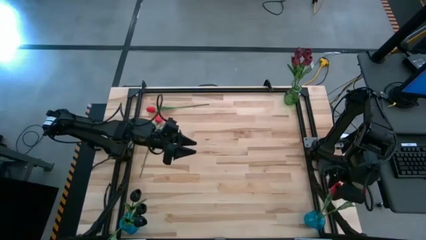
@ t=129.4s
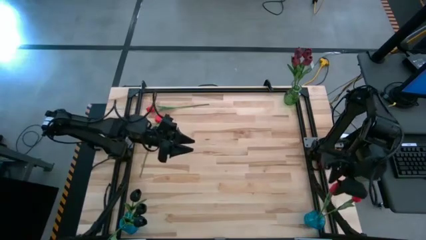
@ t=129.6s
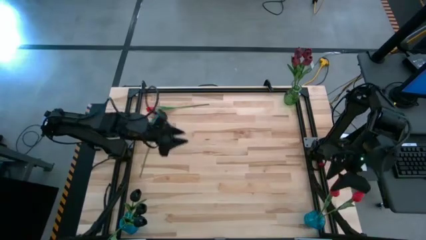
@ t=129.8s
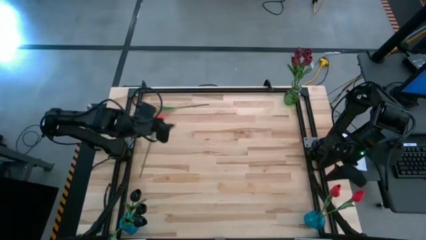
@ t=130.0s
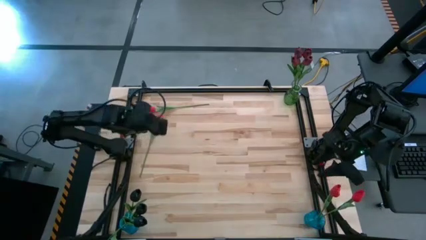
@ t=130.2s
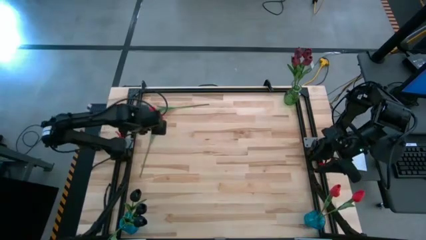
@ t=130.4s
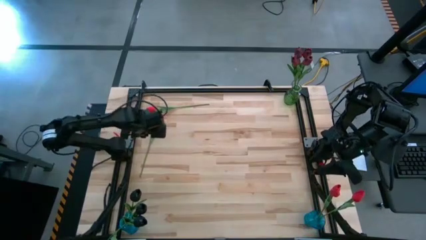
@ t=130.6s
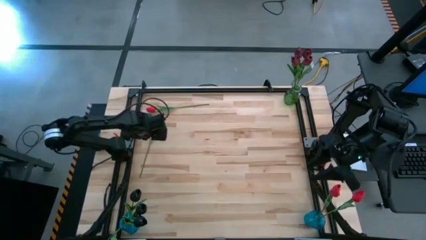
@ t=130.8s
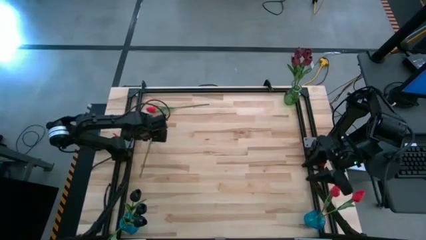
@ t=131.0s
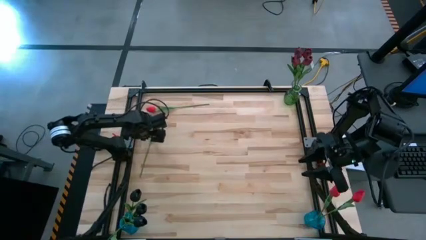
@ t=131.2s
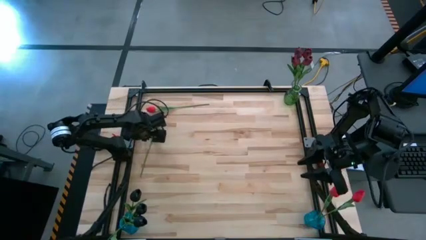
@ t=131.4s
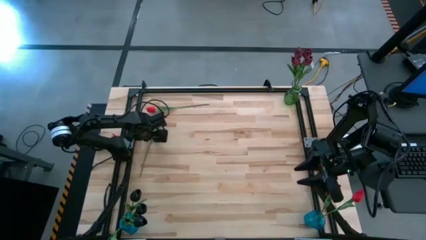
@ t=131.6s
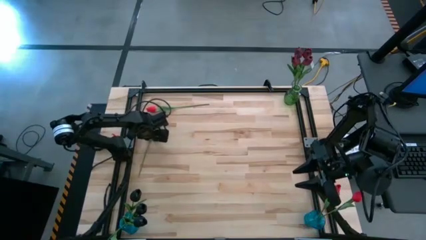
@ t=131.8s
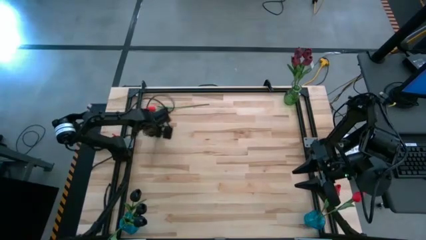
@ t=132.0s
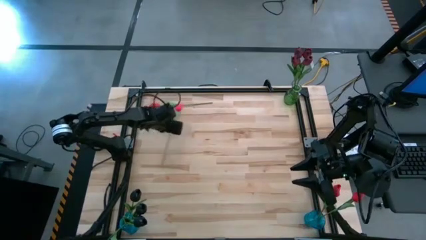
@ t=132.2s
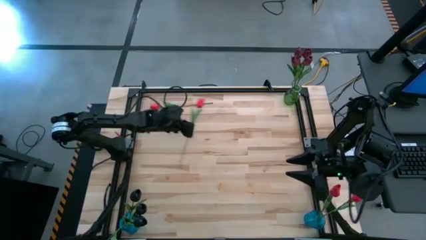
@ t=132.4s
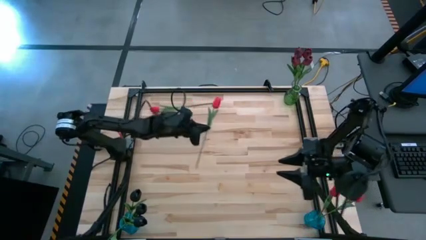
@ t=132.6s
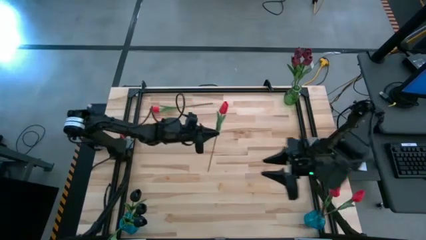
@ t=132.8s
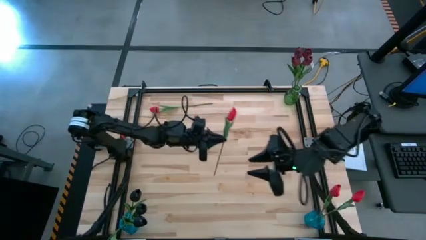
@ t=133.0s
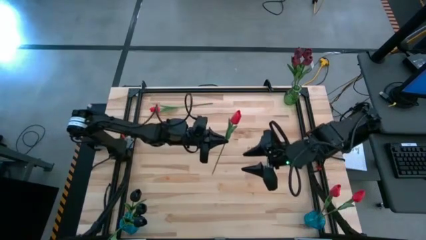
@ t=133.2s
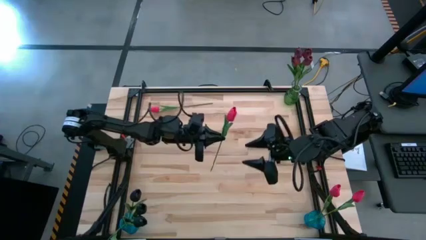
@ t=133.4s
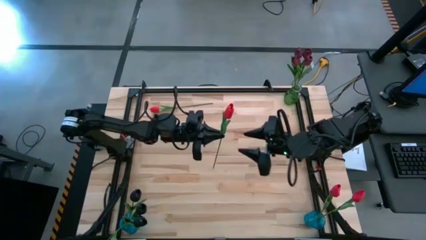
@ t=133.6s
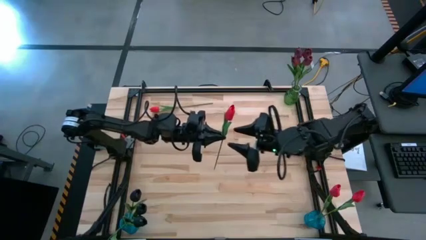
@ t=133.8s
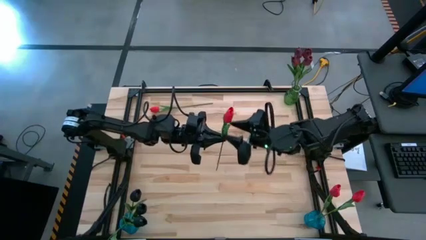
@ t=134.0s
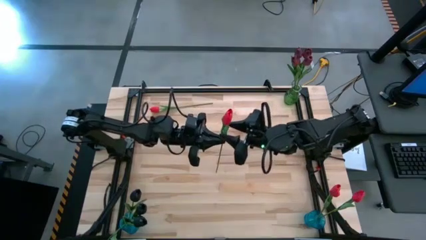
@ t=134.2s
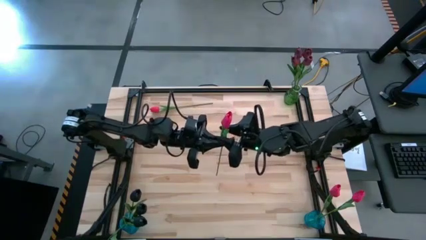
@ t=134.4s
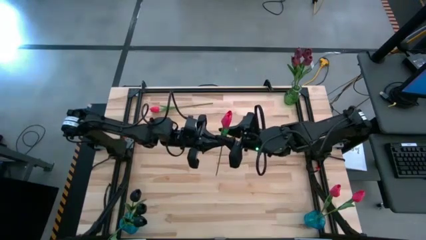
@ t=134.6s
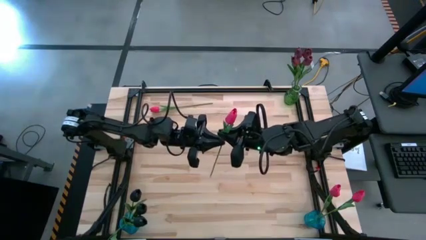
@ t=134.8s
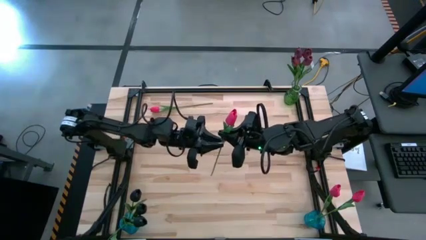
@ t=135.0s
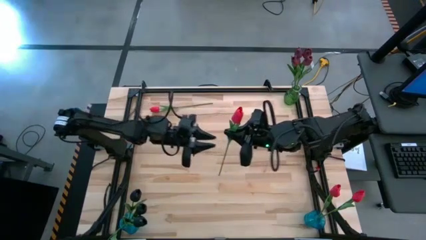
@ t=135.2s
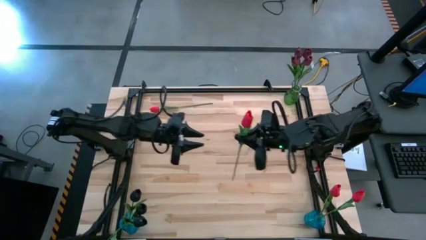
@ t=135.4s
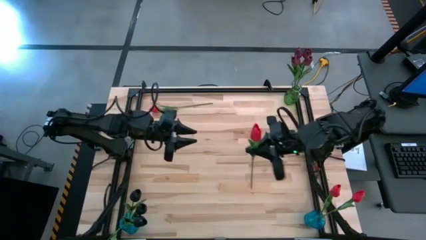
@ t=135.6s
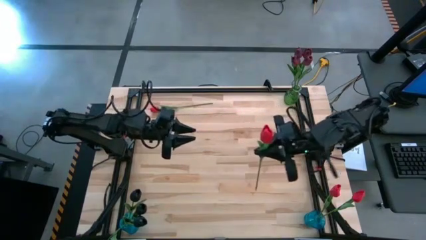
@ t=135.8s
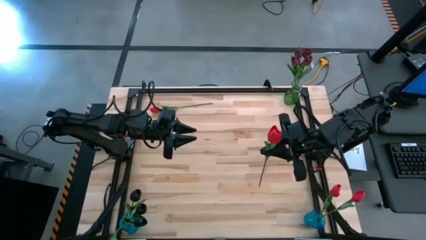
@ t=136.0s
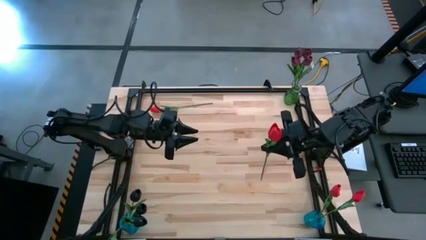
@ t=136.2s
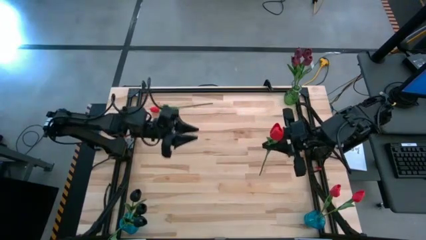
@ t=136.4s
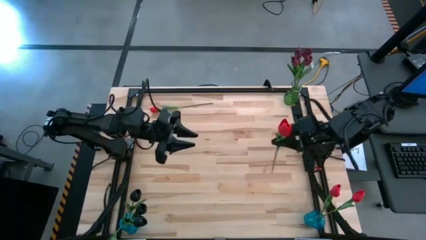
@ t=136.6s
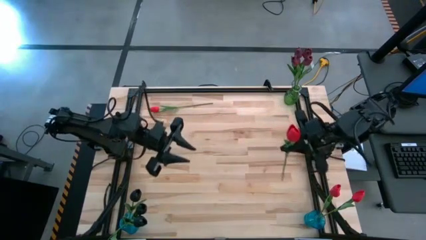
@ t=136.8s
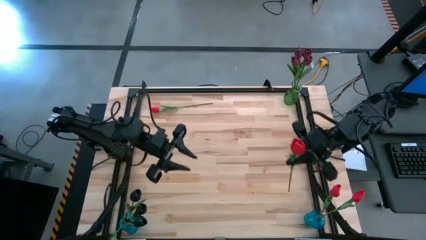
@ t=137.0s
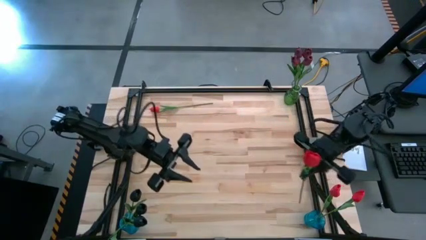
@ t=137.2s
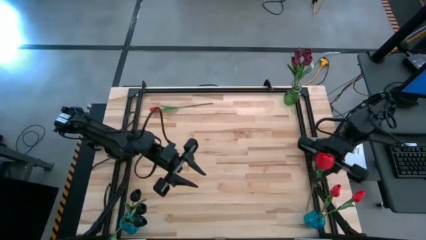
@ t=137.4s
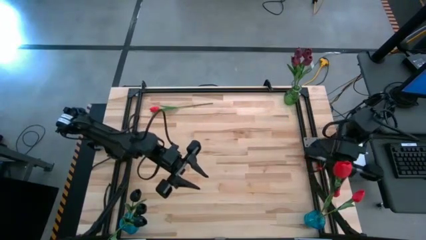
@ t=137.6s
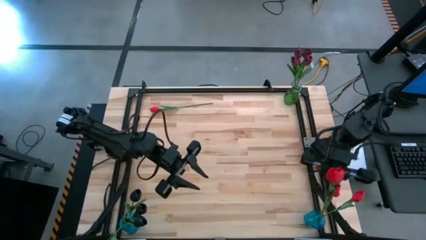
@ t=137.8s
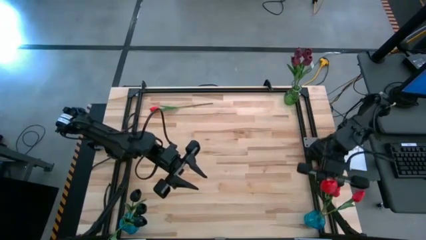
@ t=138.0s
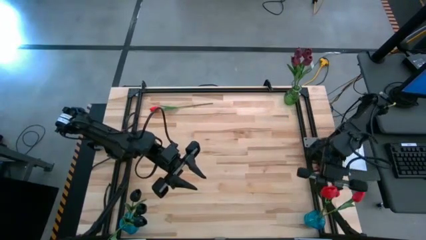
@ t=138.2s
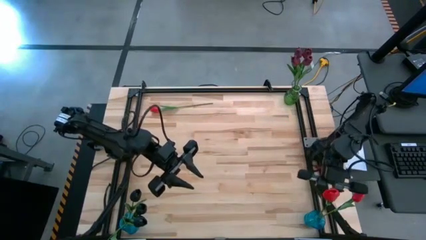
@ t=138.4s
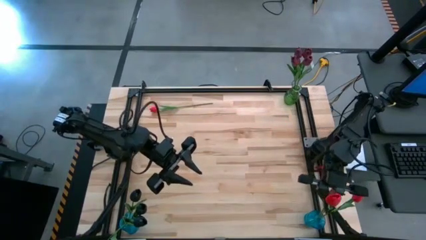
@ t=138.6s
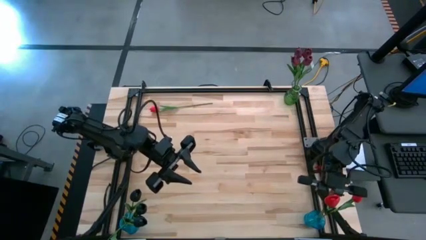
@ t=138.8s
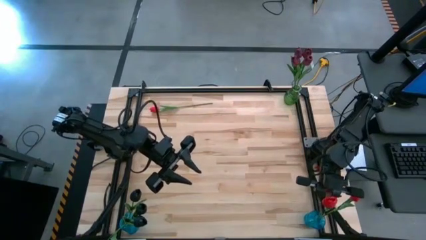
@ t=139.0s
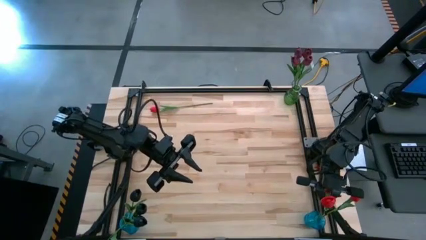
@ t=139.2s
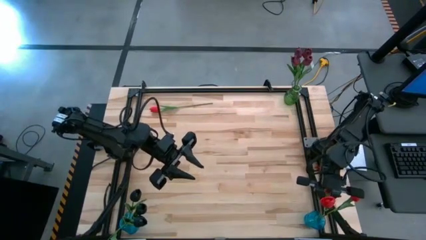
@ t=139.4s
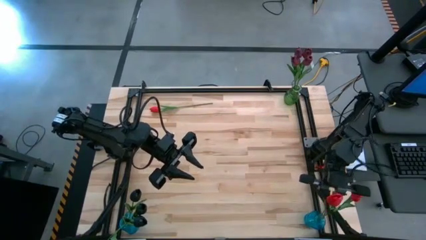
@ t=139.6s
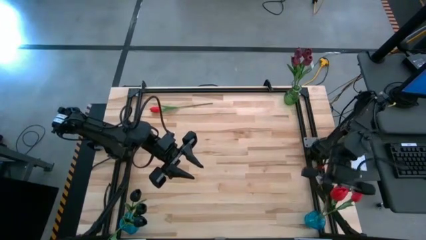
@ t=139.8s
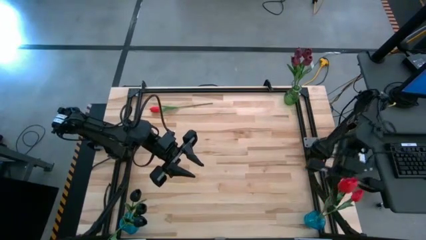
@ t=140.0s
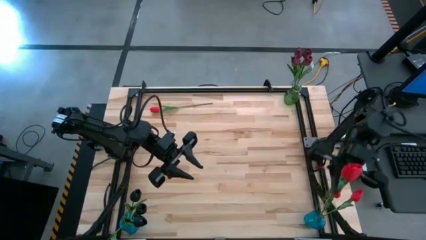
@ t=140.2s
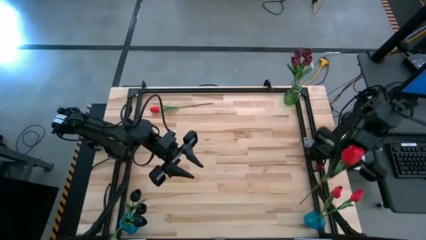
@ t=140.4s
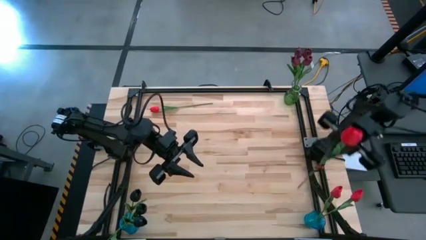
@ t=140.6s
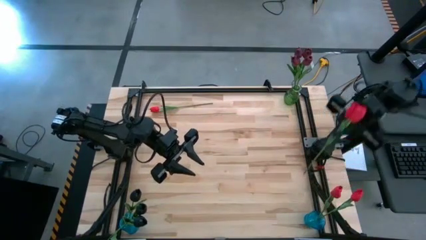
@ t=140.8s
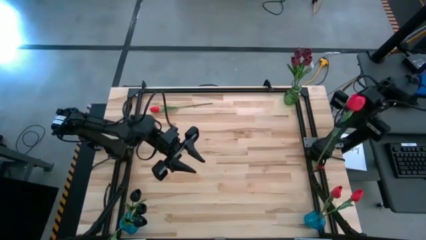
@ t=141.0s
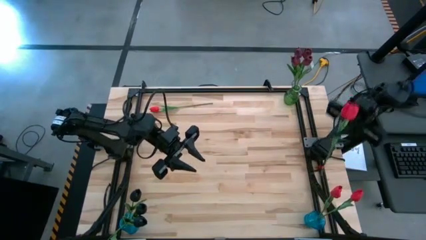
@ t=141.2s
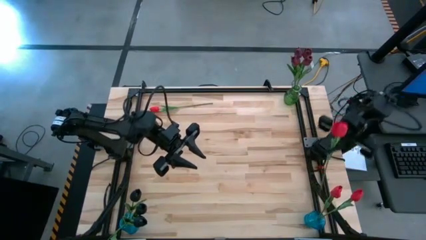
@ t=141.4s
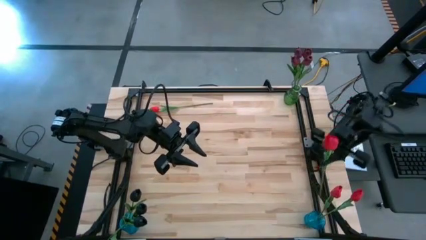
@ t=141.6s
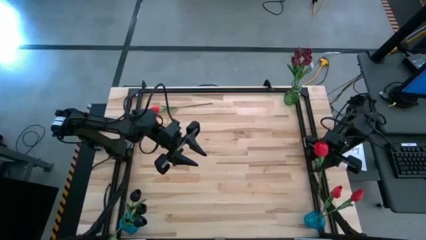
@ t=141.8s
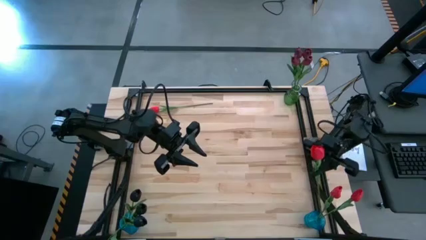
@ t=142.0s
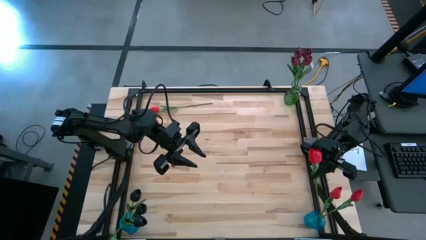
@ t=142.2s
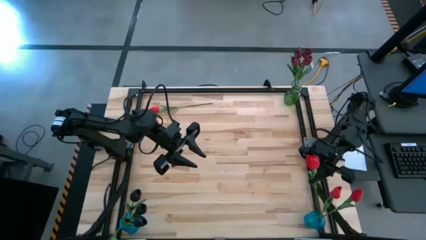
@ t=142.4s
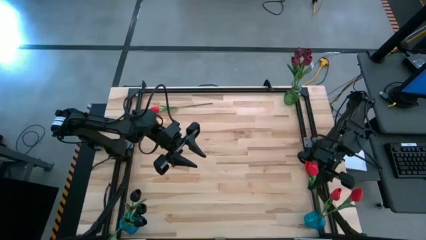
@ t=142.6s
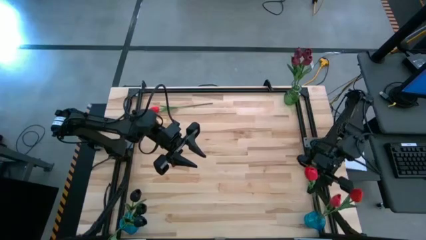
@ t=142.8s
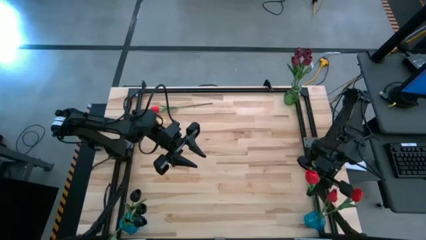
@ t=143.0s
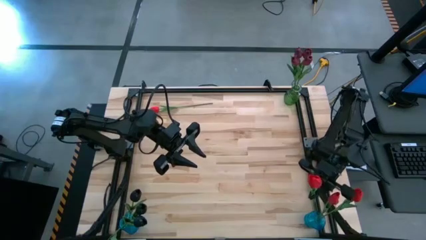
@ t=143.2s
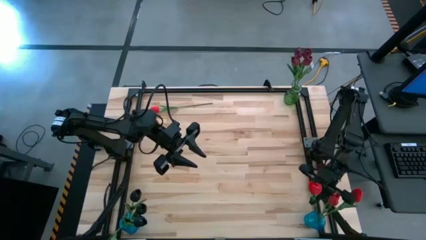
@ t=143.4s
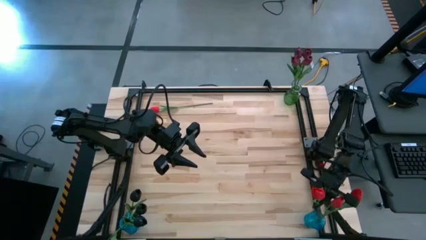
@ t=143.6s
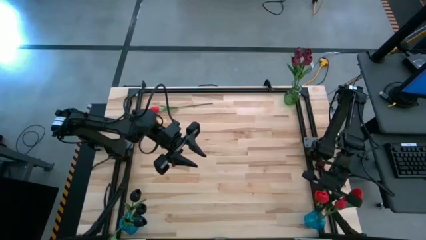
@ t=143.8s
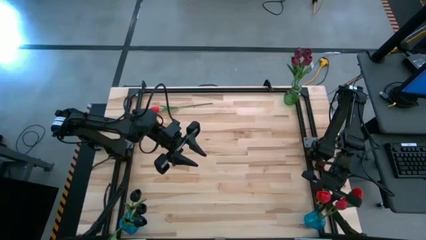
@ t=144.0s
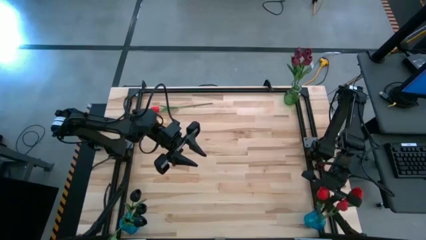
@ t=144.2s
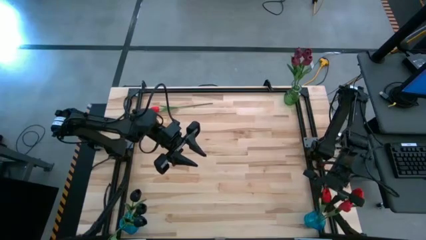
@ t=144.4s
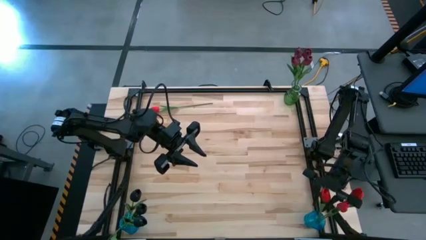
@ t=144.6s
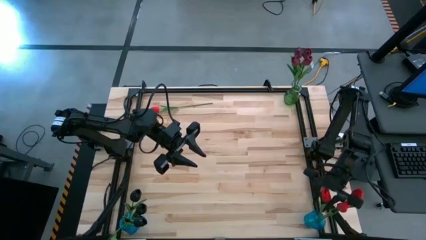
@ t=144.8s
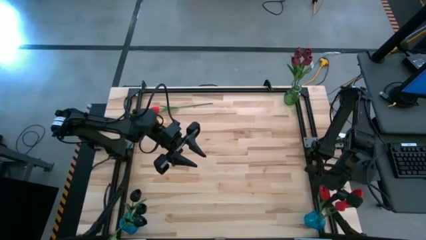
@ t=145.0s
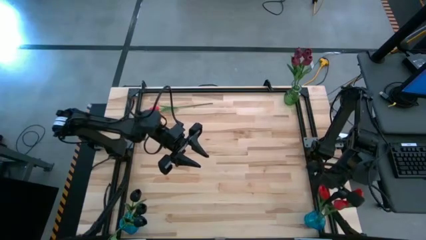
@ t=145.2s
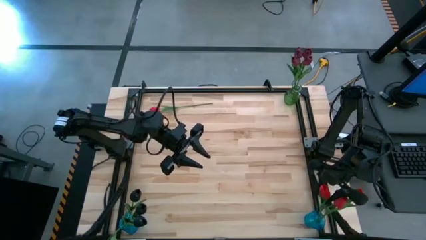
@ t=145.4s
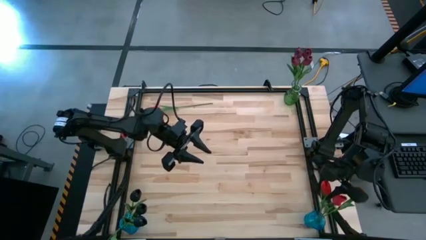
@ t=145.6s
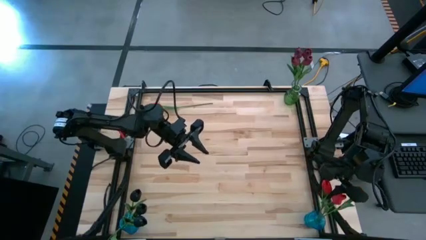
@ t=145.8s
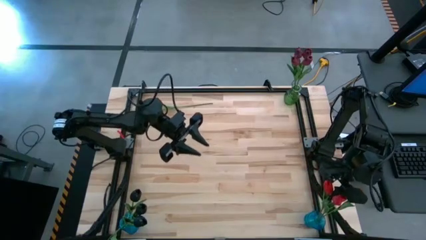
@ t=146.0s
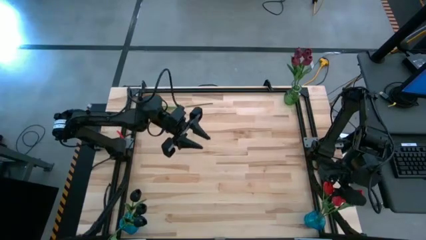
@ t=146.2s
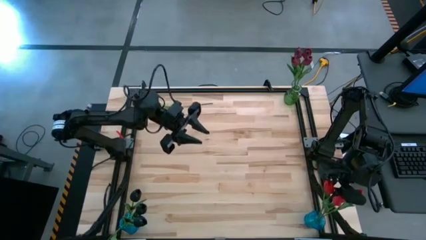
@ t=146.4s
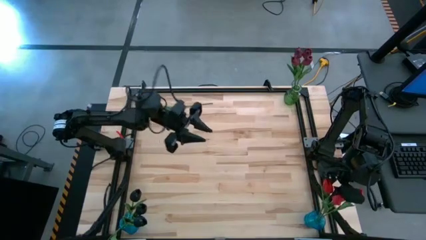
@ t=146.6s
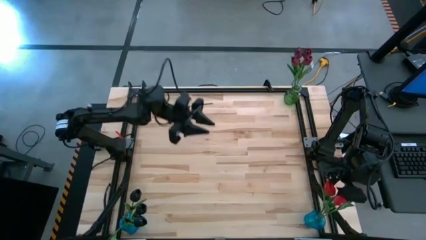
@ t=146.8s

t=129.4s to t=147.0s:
Task: Sort flowers into vase by color
Put the red tulip into the right blue vase
